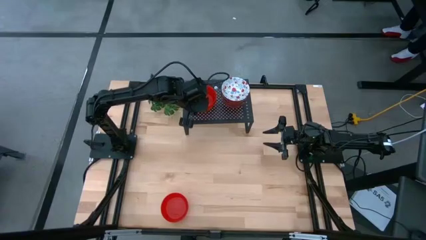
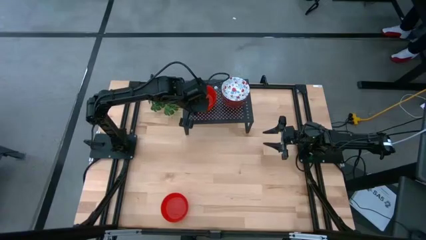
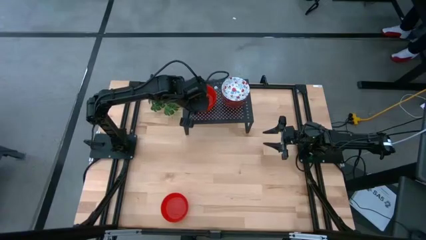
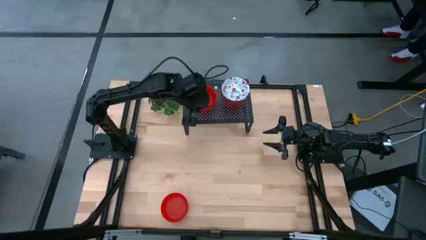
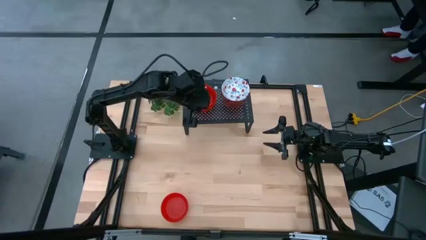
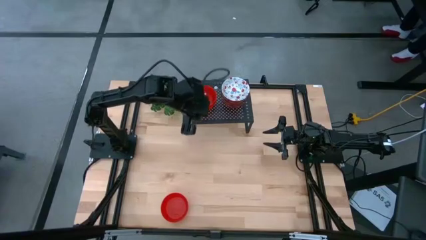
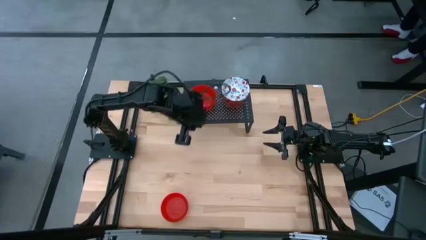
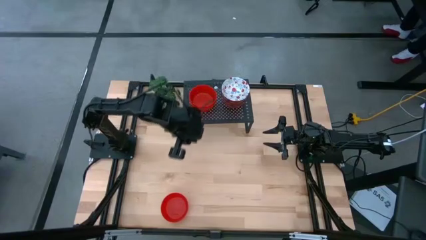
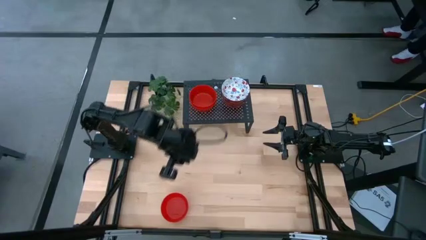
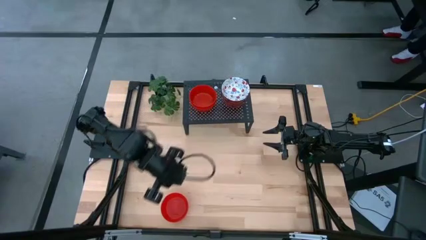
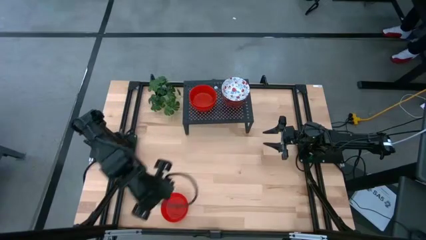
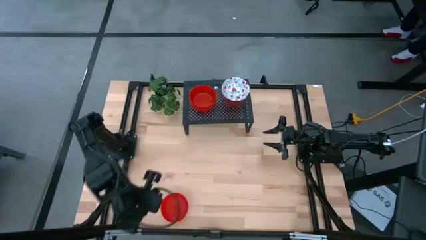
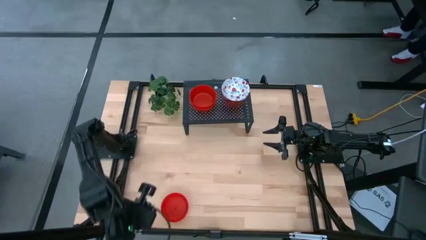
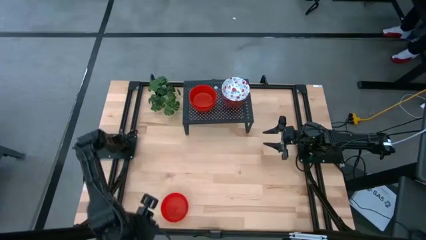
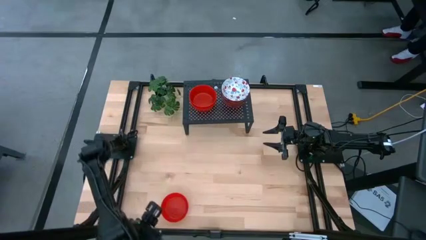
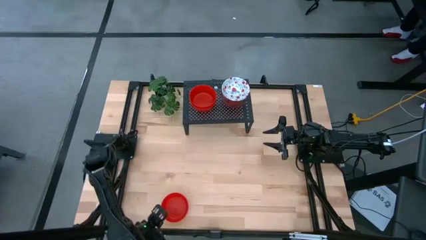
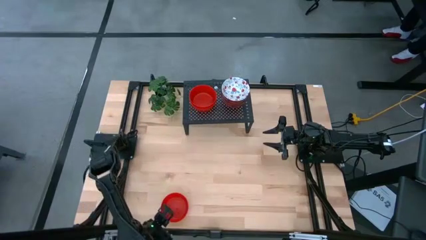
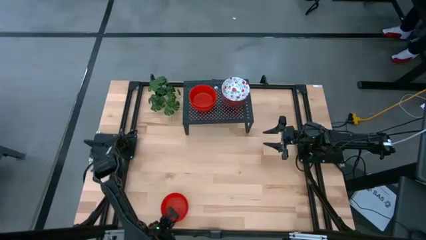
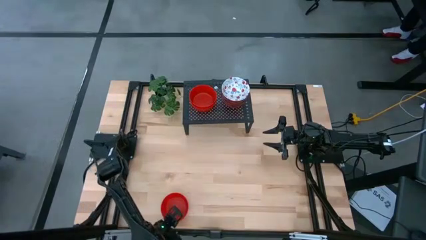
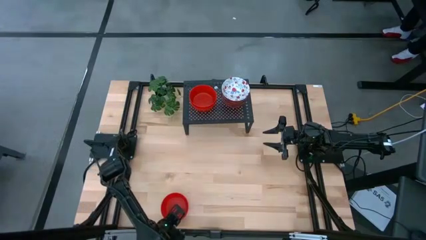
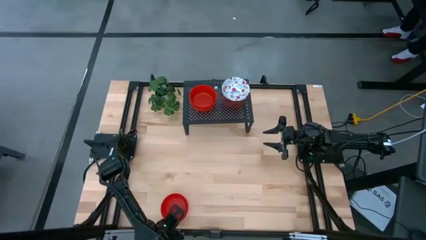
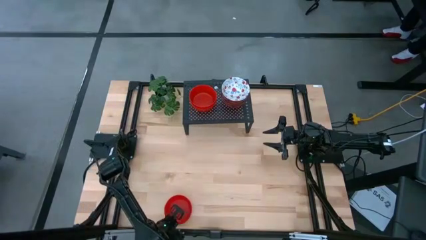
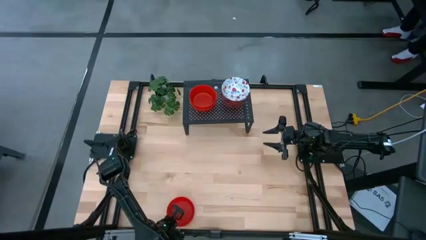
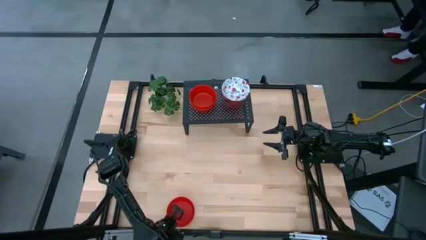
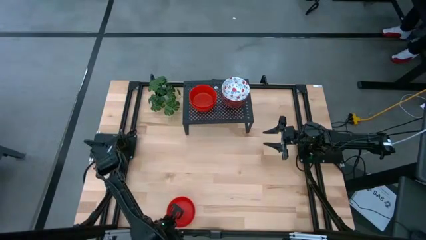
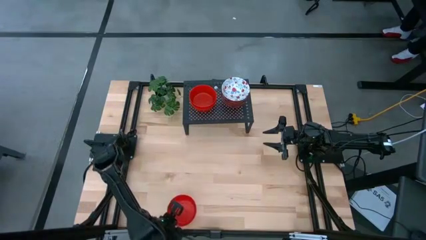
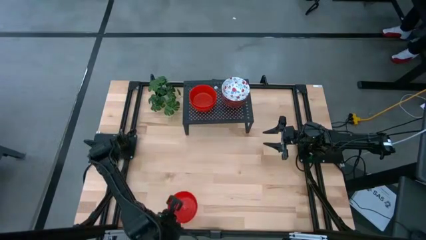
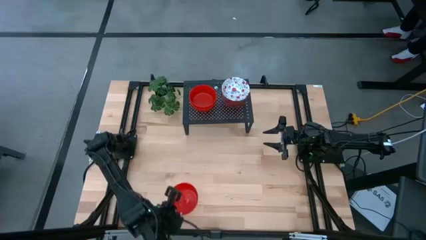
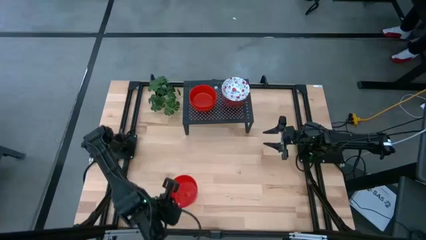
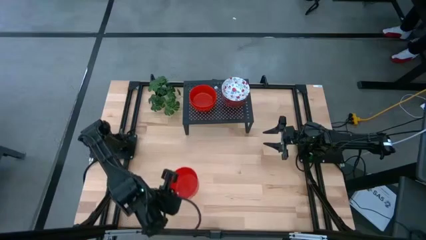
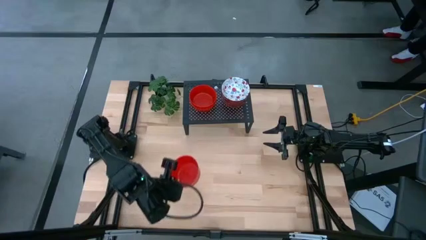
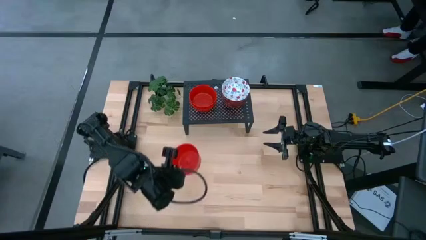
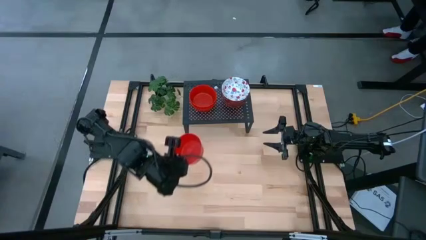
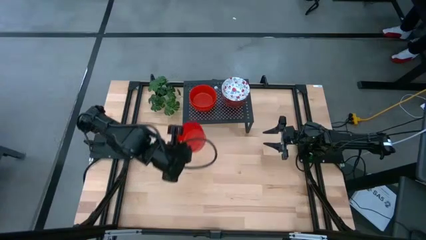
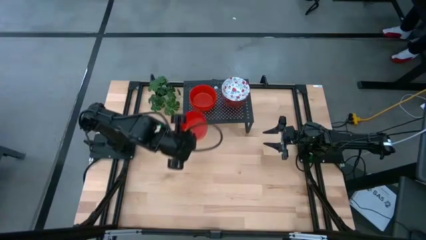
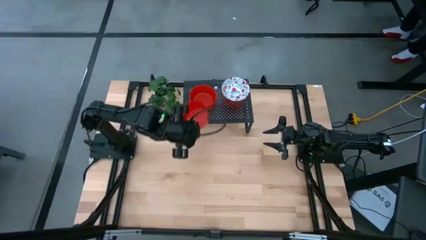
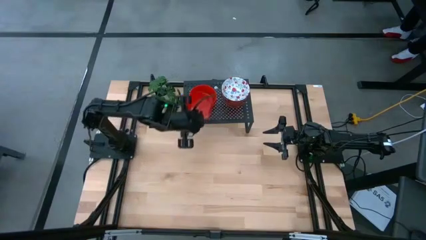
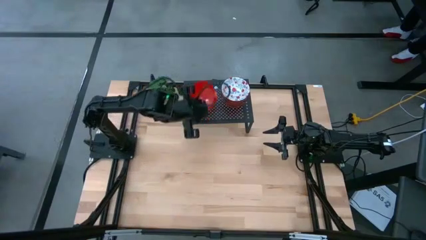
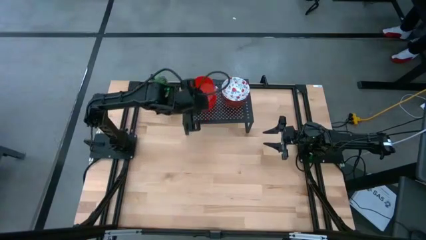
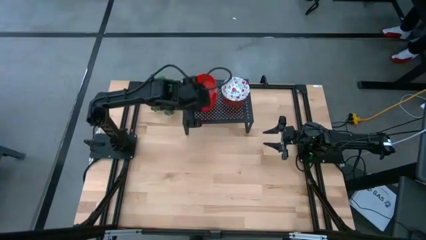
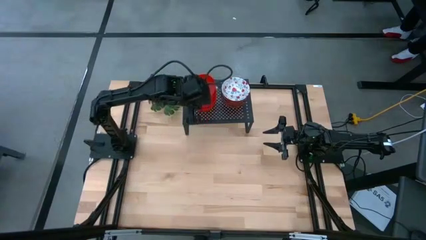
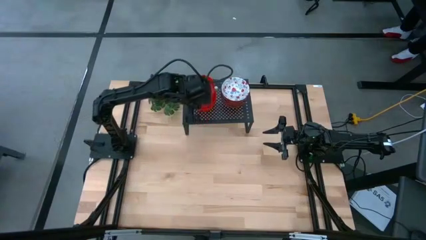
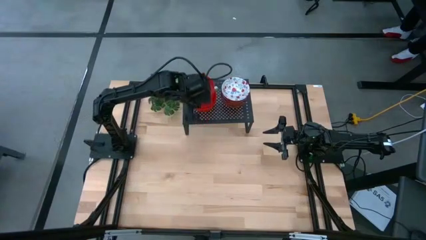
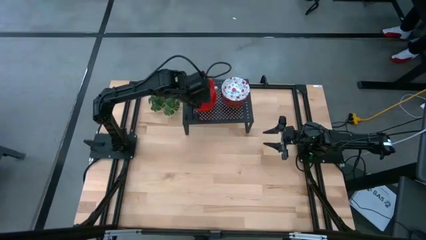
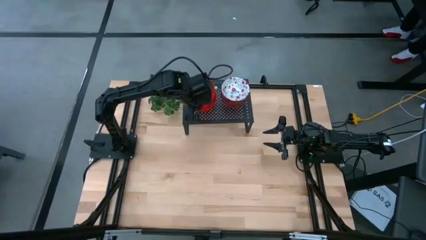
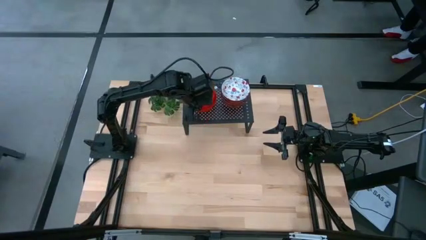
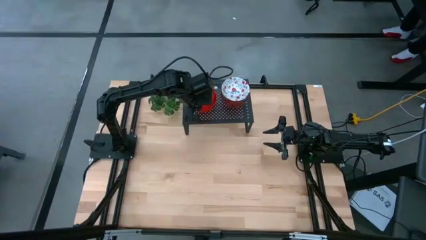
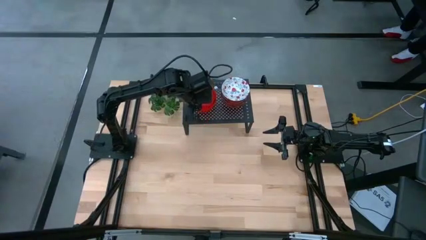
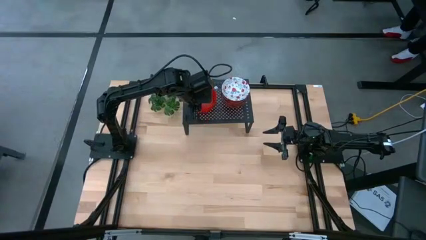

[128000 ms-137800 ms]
Task: Pick & Place Mini bowls
Stack the red bowl on the top of the red bowl on the shelf

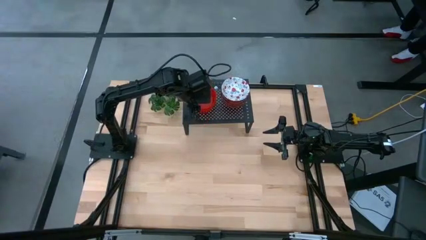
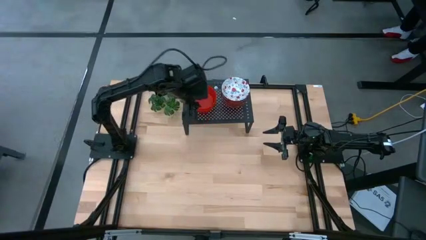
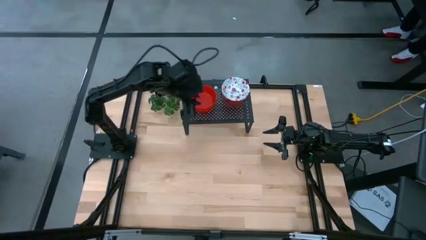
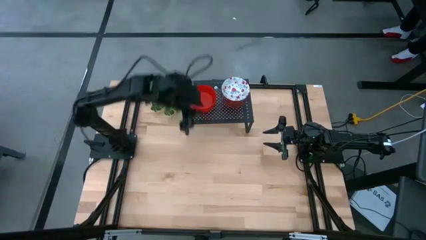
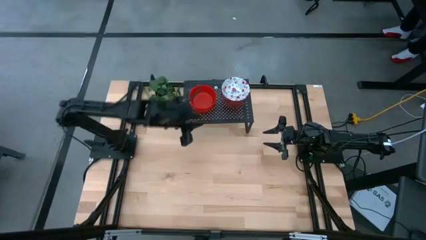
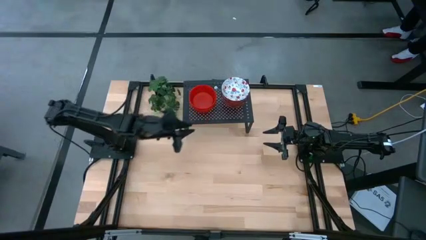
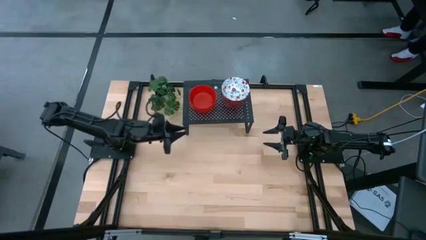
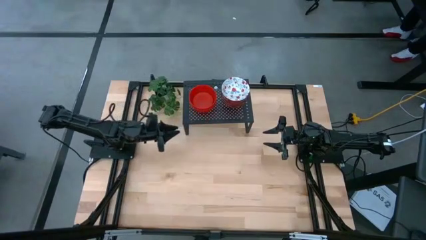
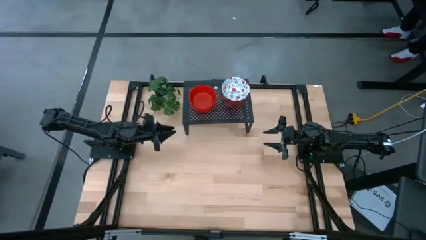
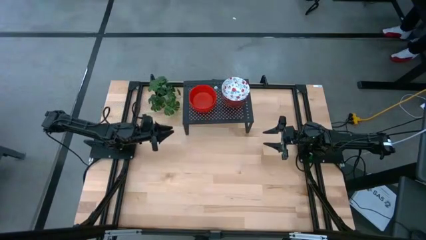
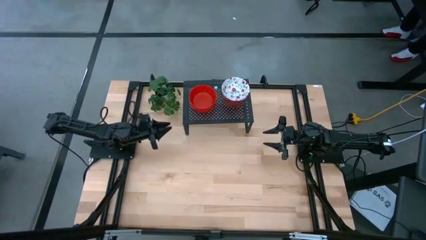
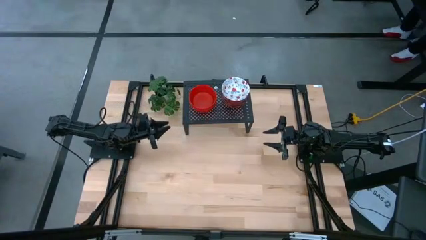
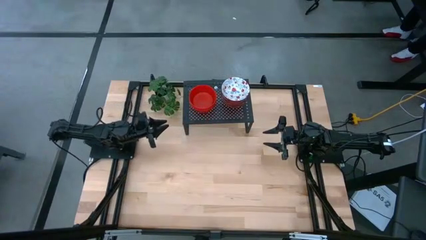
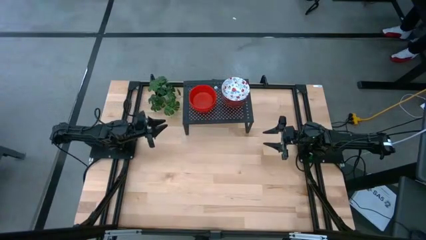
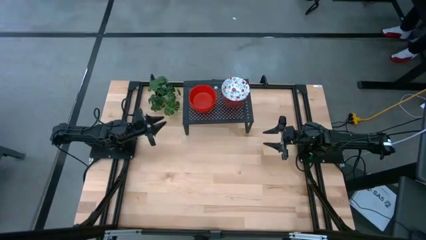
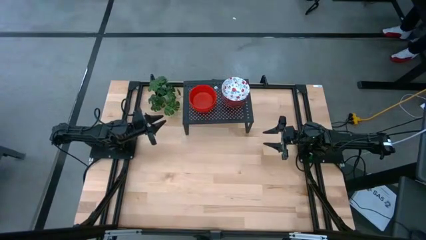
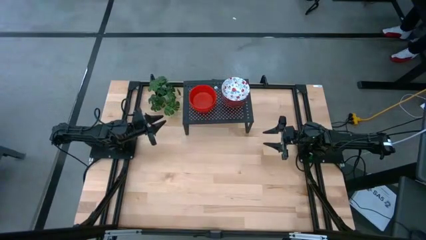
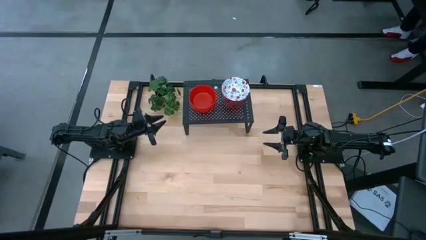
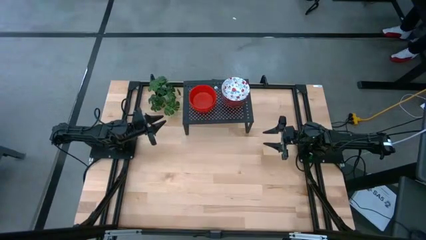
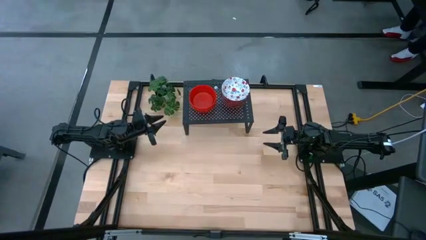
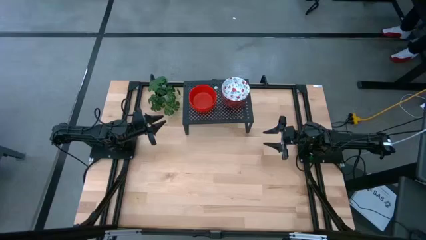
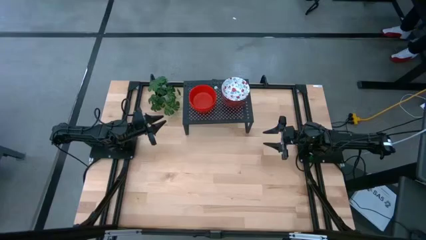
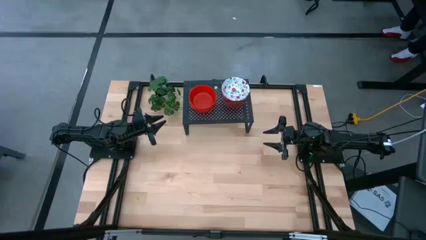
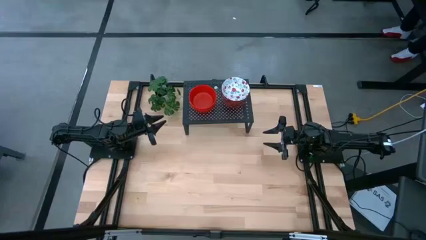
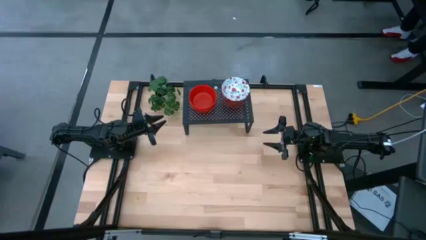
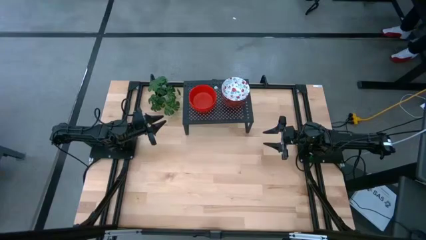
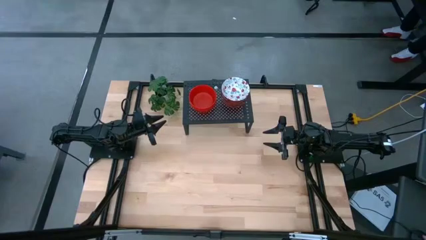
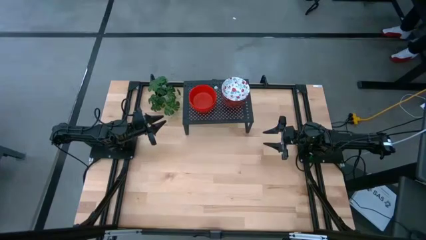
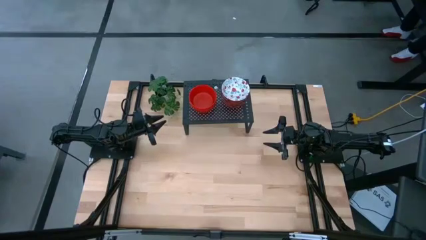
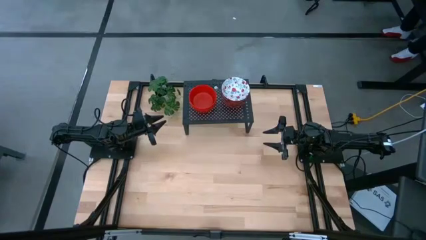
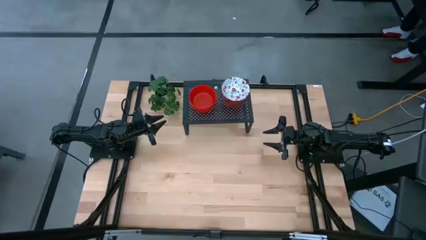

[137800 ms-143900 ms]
Return to Home Position
